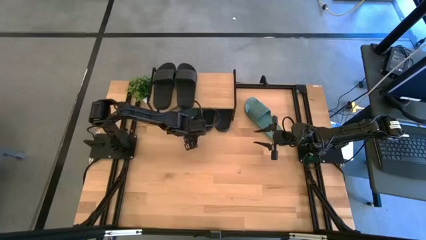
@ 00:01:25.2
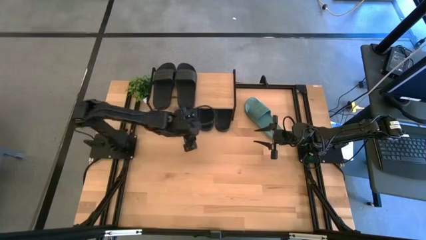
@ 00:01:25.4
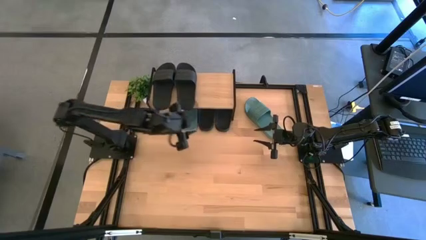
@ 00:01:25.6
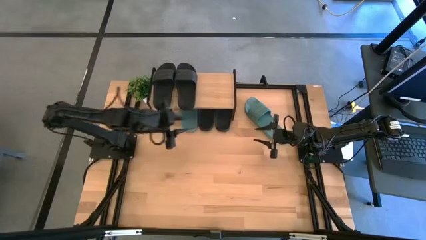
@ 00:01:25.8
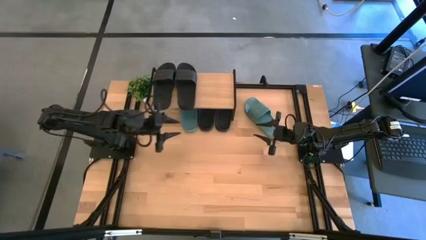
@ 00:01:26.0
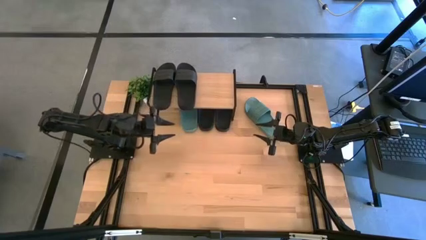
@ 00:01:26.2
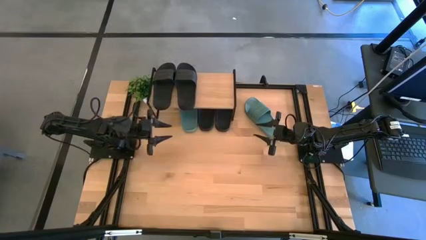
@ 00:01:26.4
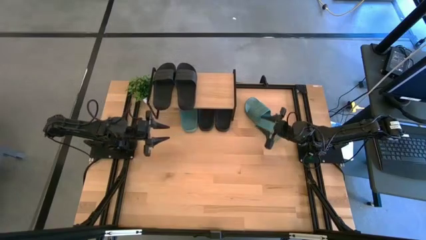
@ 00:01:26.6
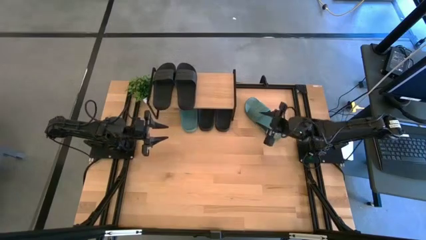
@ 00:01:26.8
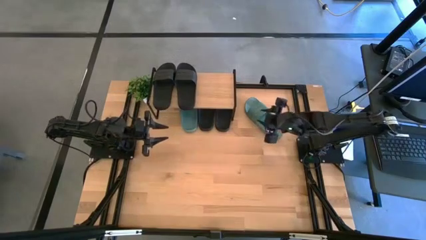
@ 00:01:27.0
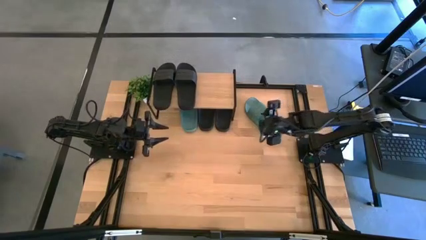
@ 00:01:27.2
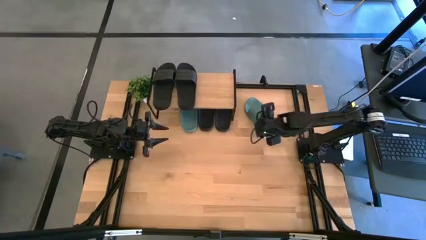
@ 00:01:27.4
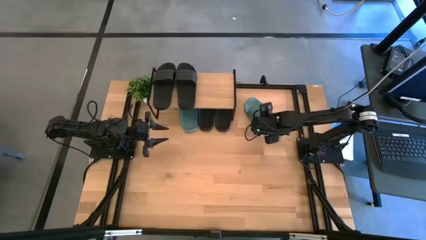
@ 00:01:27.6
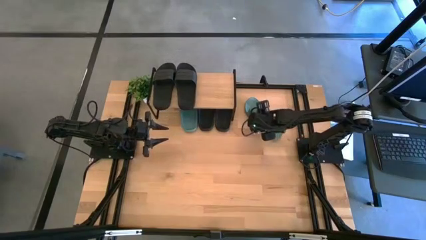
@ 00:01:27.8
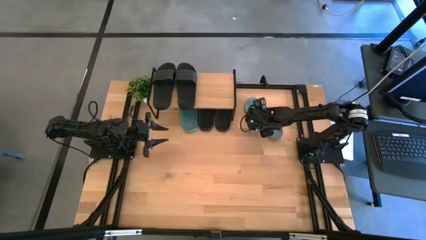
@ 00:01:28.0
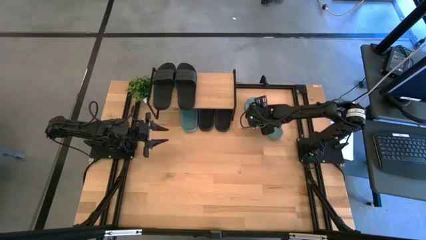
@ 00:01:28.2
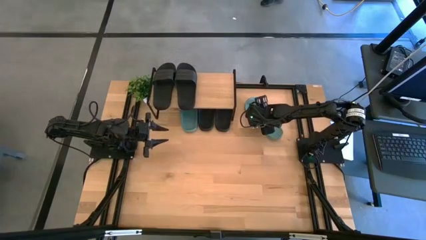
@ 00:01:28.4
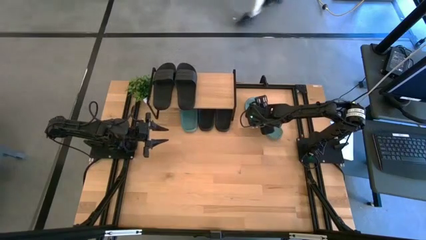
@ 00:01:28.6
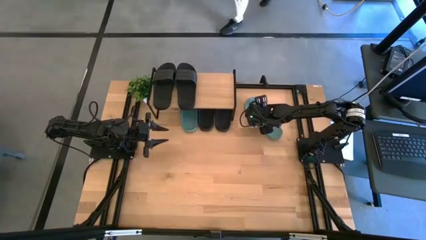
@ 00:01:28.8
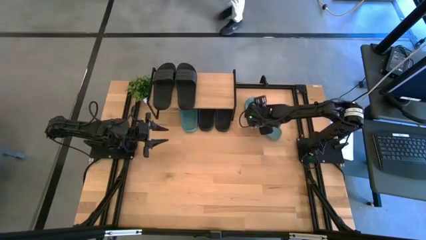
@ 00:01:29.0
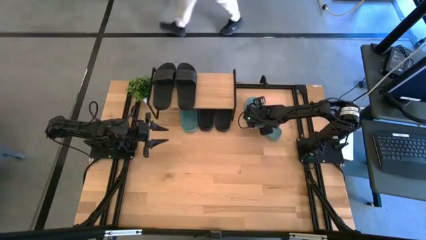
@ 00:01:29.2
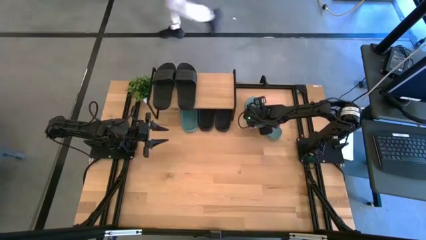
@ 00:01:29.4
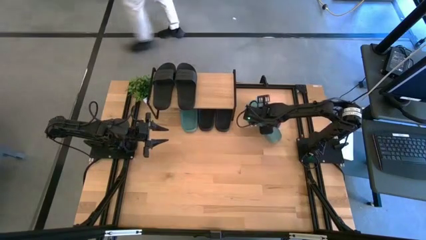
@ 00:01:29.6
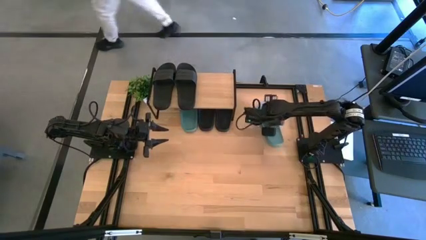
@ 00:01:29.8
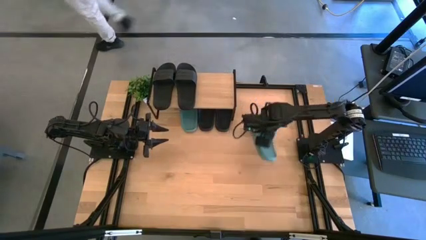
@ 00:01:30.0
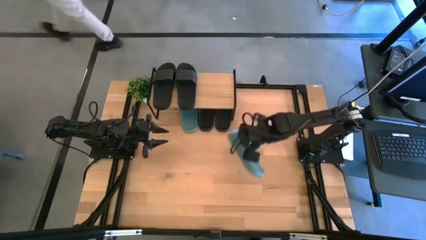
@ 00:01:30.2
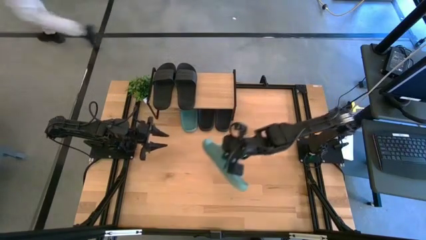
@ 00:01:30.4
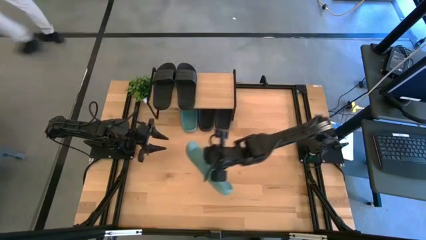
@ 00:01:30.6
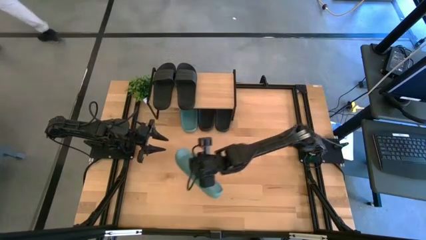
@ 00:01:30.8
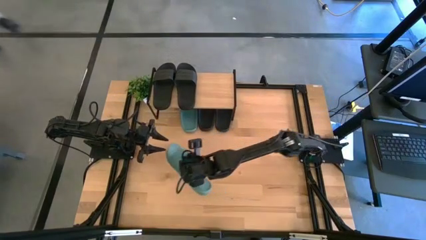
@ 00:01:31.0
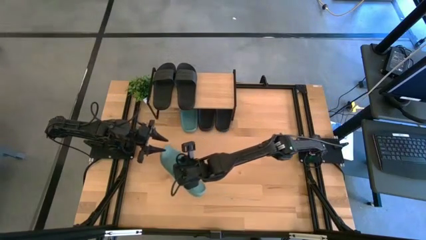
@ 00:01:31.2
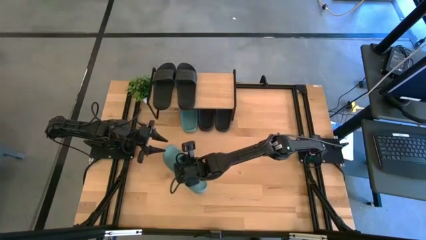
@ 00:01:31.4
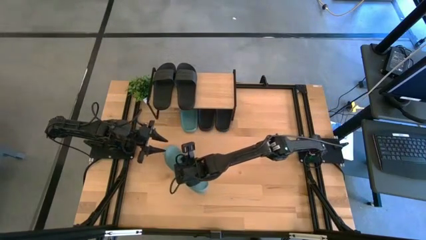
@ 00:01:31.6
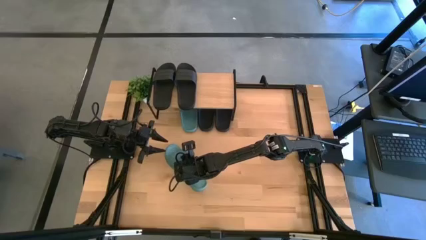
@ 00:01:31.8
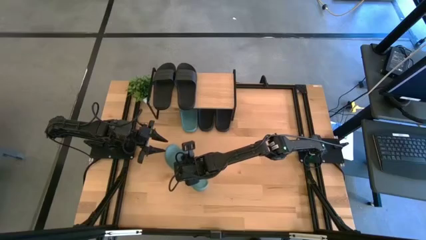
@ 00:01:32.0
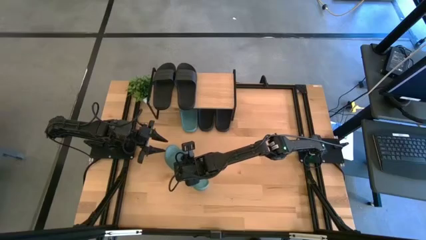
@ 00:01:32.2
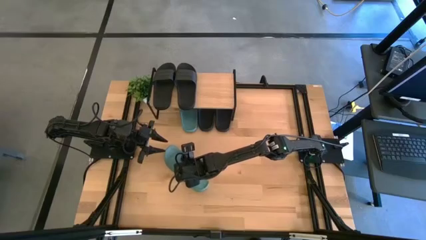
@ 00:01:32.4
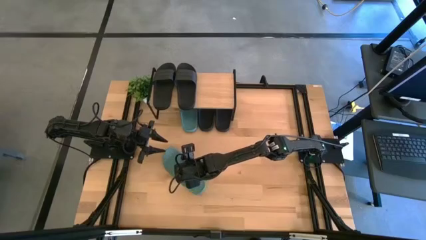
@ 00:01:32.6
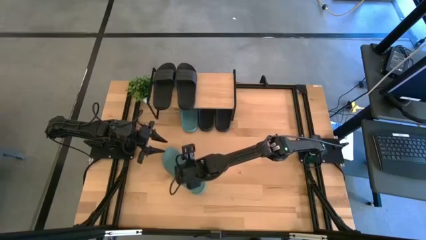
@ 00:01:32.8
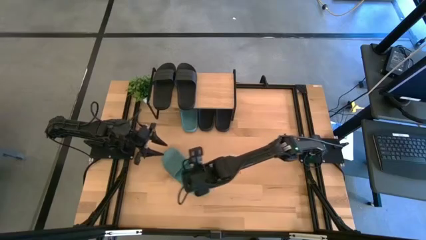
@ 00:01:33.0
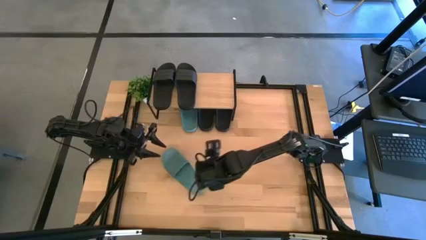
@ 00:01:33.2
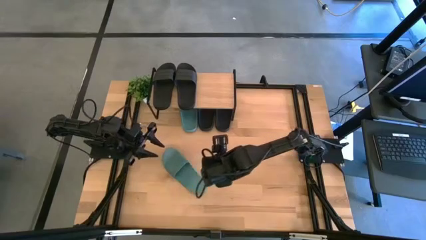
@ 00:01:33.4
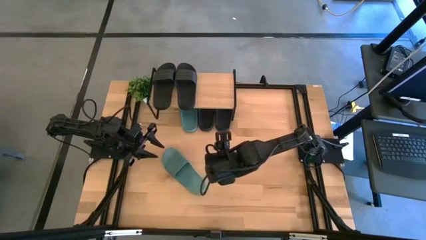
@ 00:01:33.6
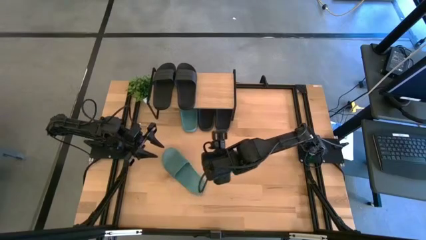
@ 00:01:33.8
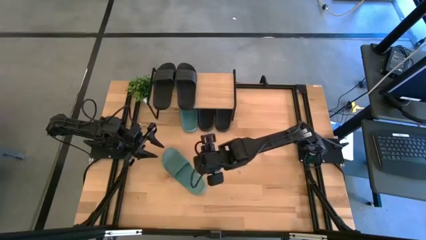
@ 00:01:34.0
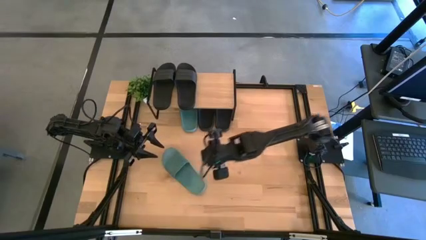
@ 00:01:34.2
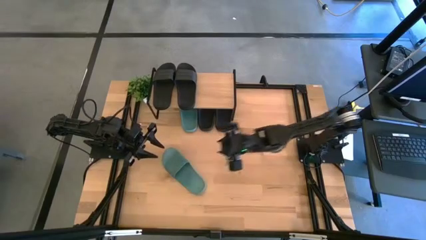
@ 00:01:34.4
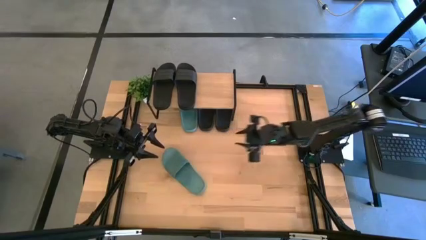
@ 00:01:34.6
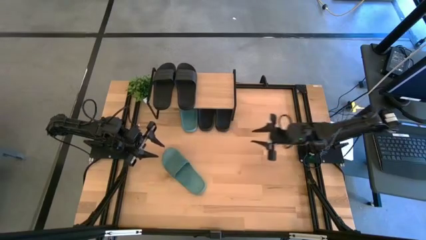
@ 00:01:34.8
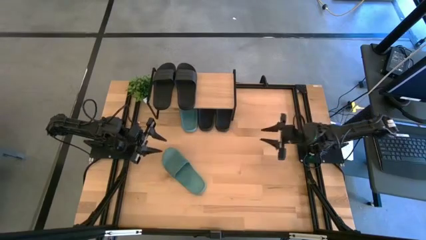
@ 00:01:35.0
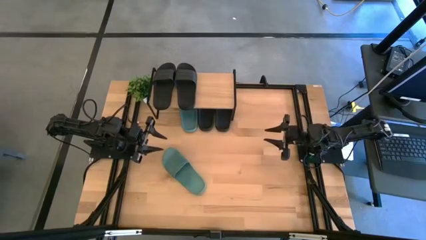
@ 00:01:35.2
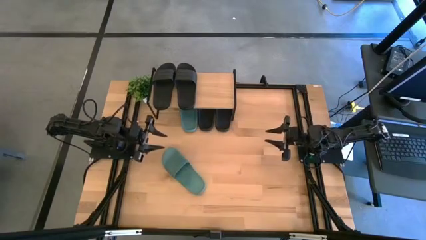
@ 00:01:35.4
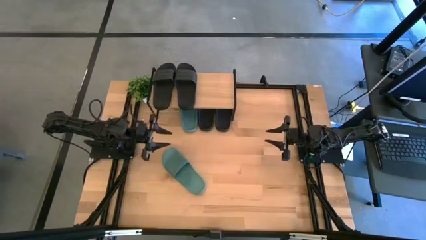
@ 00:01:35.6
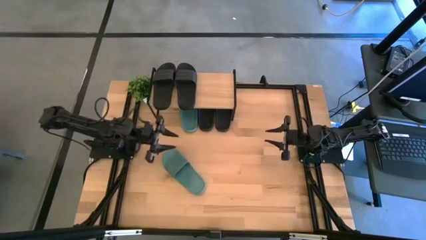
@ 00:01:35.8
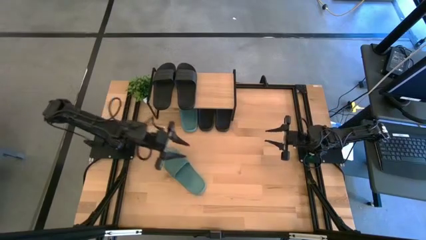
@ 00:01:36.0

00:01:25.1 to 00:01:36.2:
Task: Pick and place slides into the shelf
Put the blue slipper under the shelf
